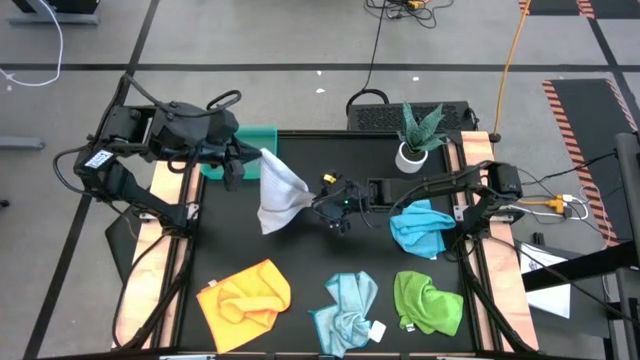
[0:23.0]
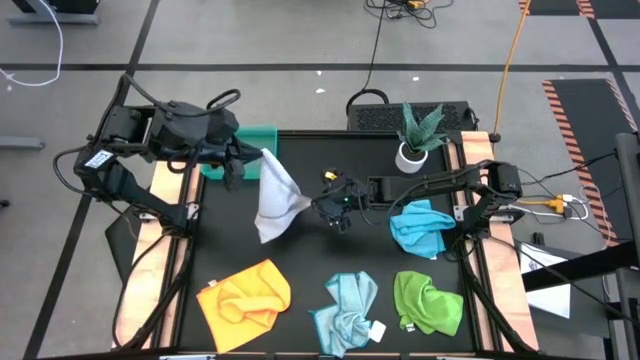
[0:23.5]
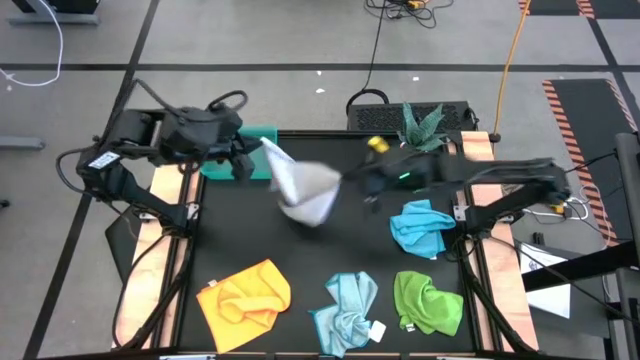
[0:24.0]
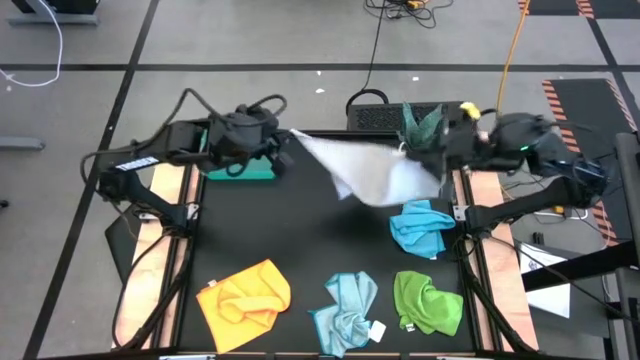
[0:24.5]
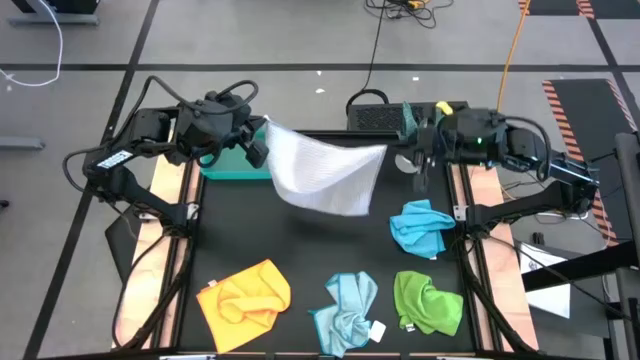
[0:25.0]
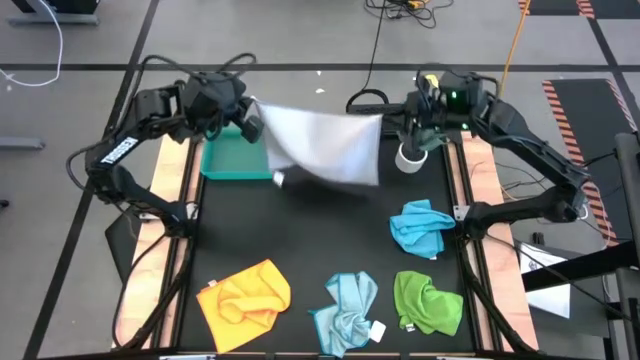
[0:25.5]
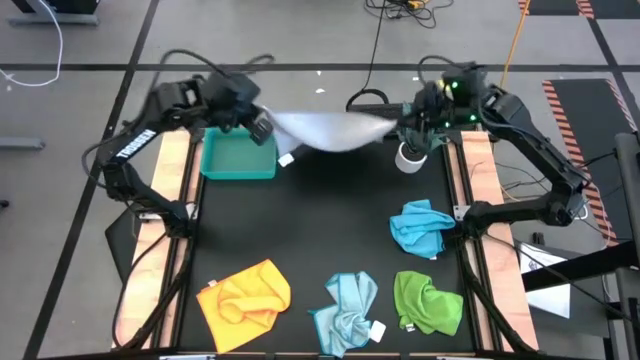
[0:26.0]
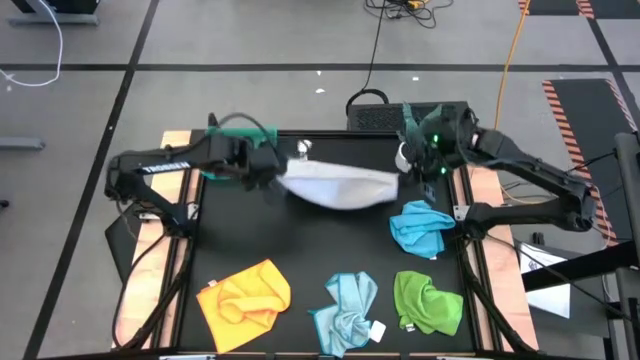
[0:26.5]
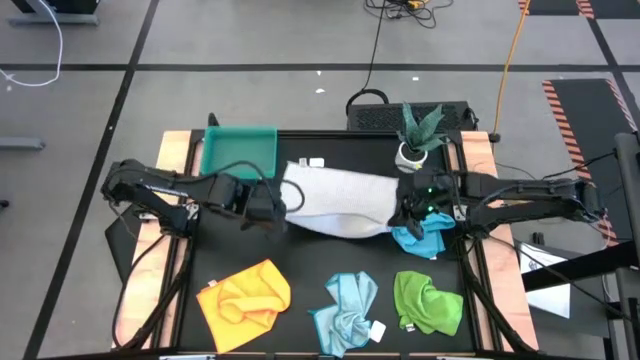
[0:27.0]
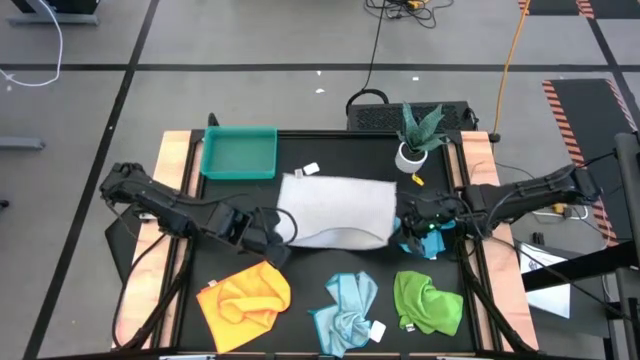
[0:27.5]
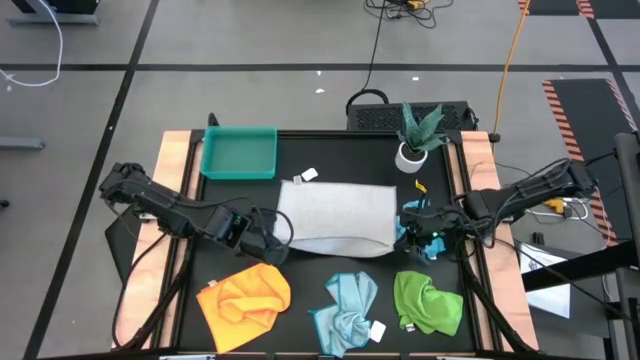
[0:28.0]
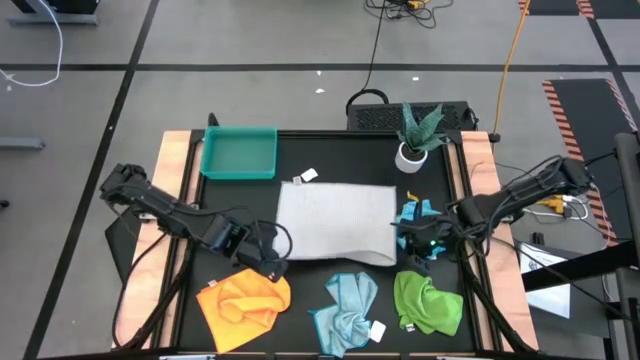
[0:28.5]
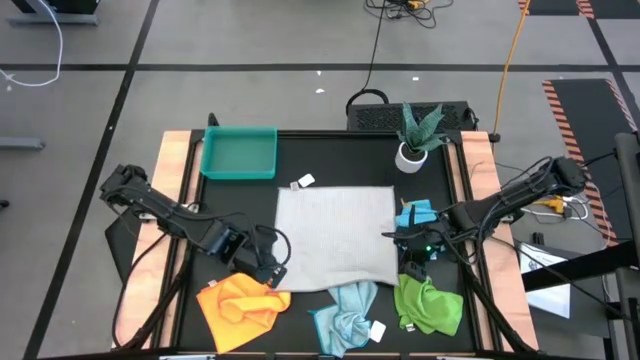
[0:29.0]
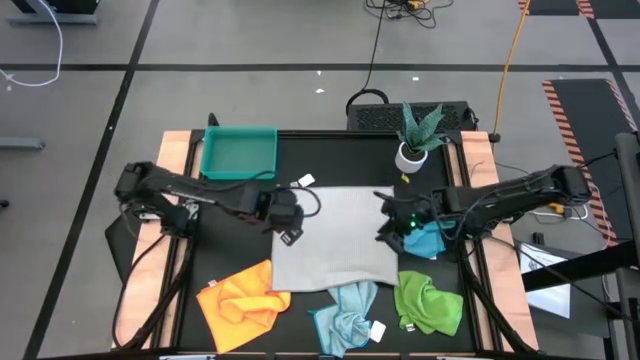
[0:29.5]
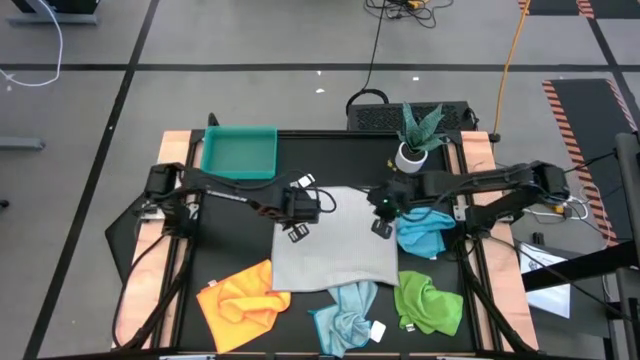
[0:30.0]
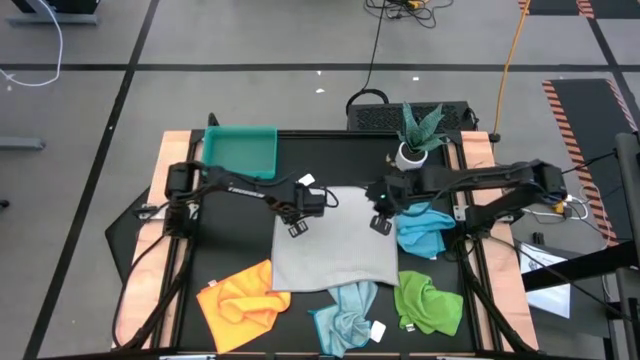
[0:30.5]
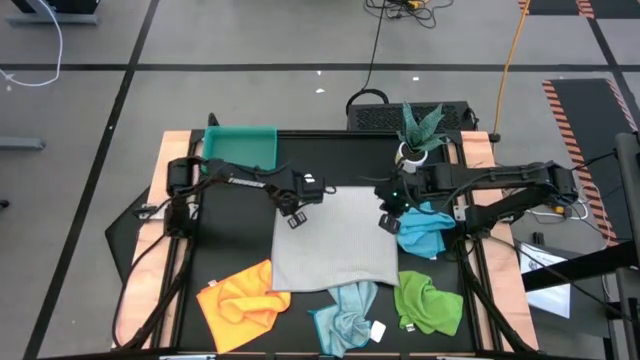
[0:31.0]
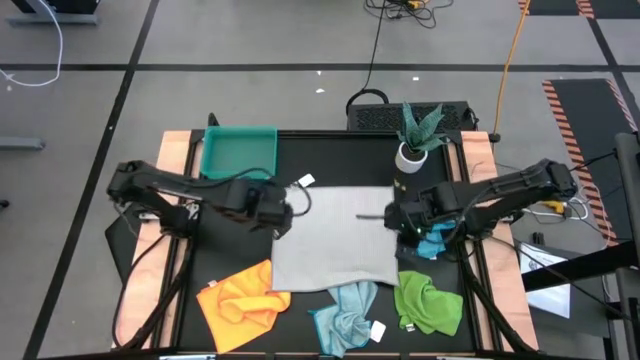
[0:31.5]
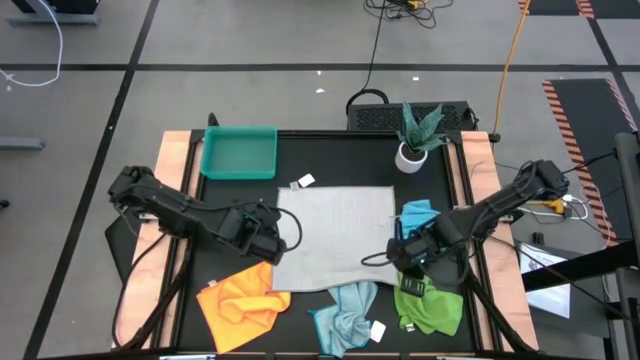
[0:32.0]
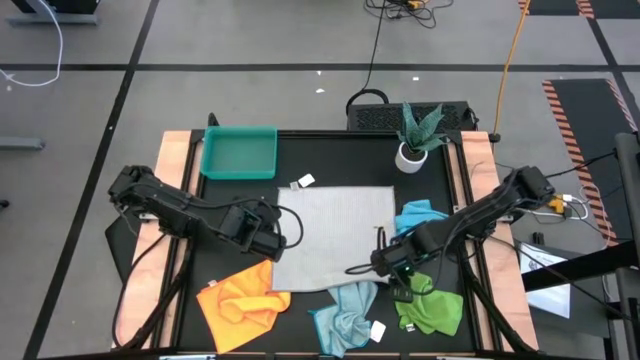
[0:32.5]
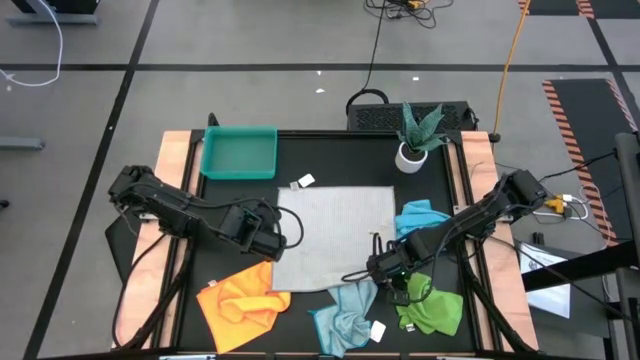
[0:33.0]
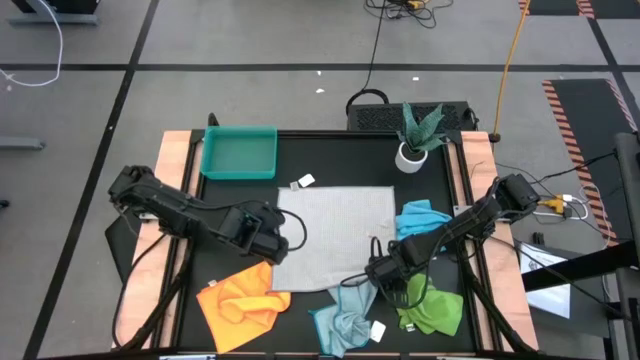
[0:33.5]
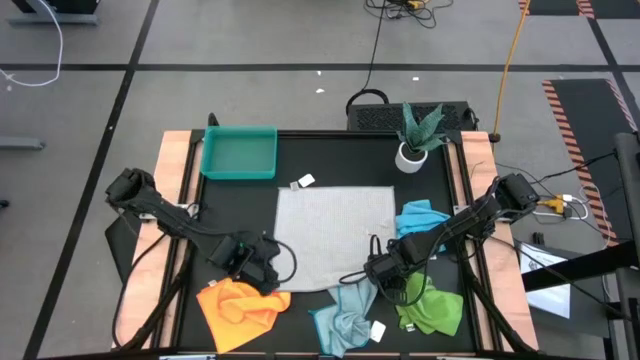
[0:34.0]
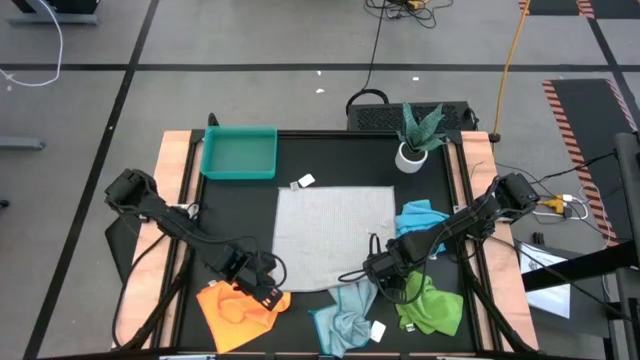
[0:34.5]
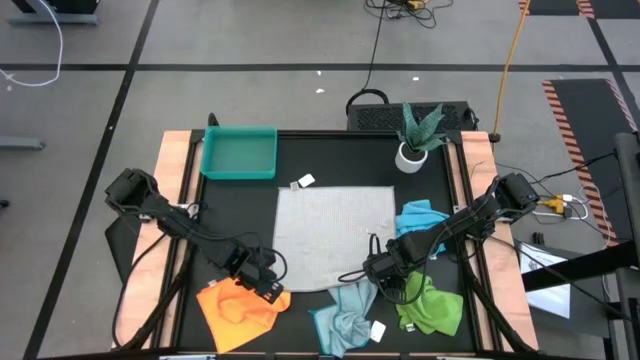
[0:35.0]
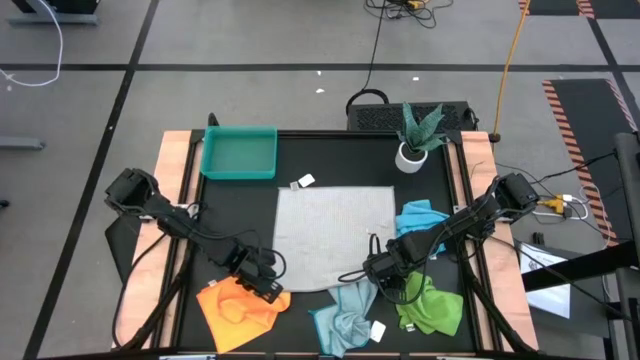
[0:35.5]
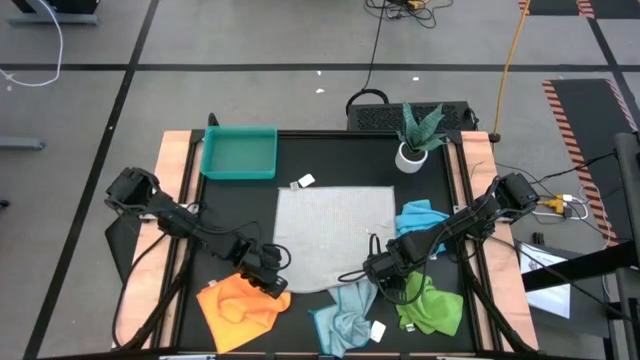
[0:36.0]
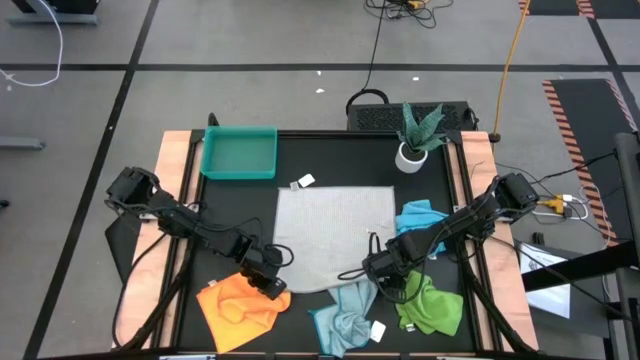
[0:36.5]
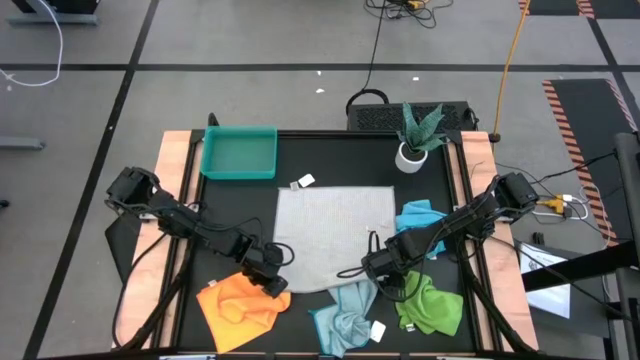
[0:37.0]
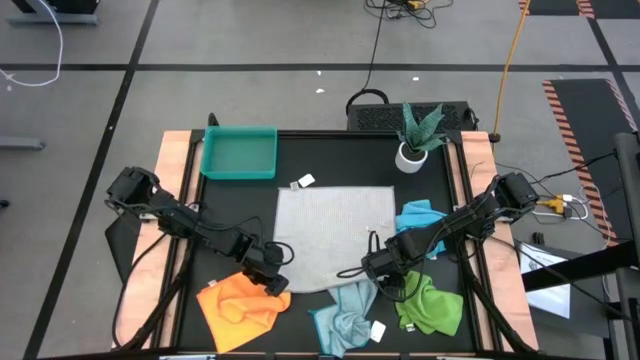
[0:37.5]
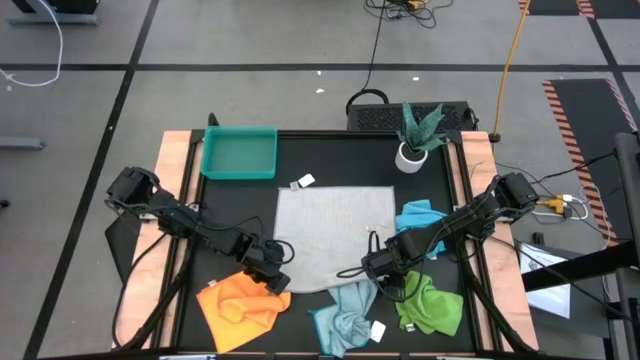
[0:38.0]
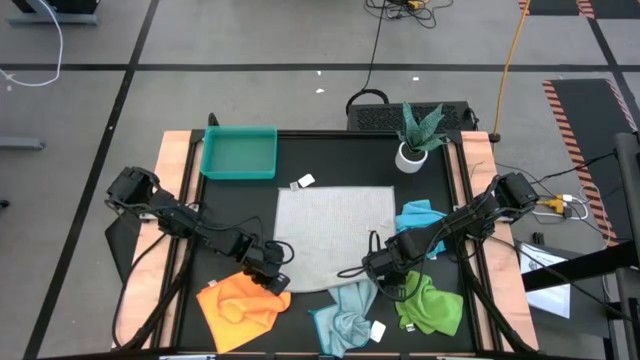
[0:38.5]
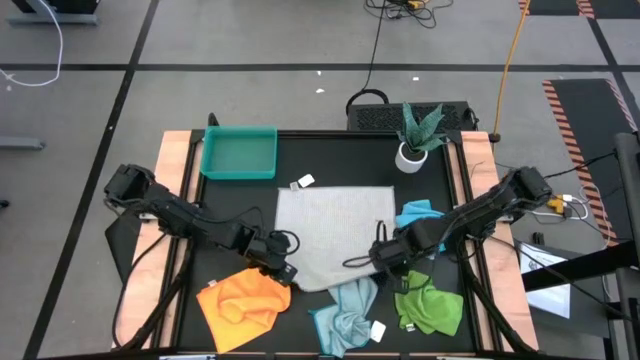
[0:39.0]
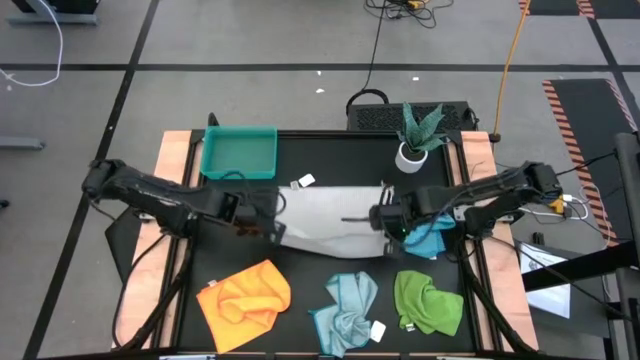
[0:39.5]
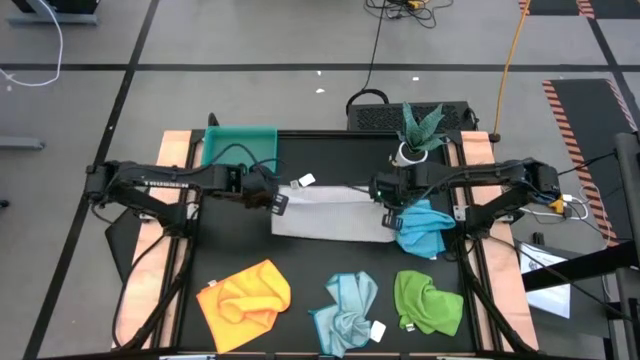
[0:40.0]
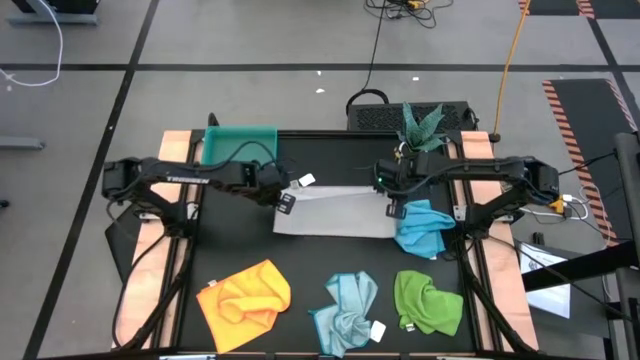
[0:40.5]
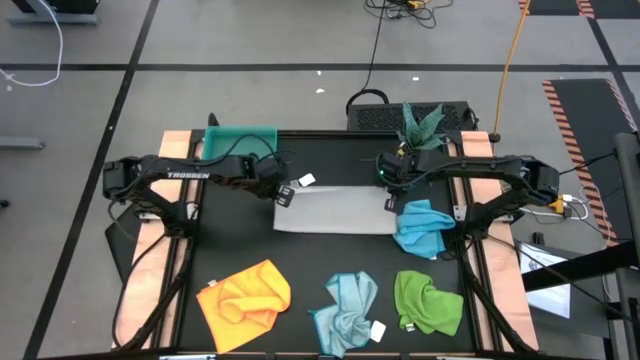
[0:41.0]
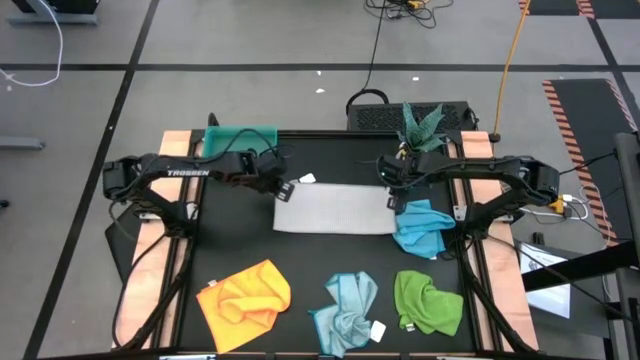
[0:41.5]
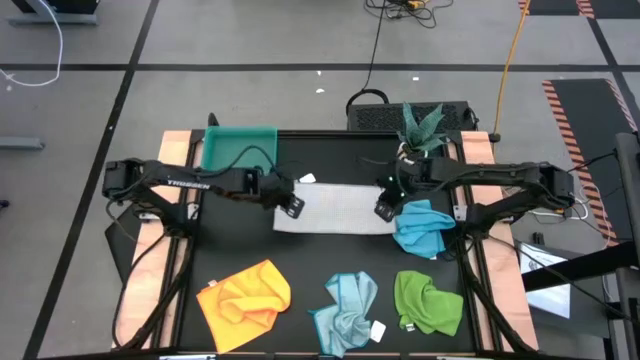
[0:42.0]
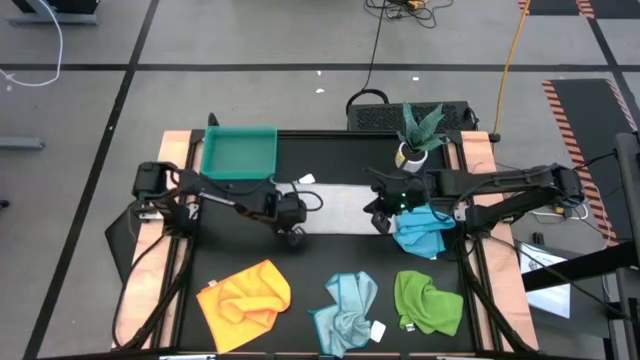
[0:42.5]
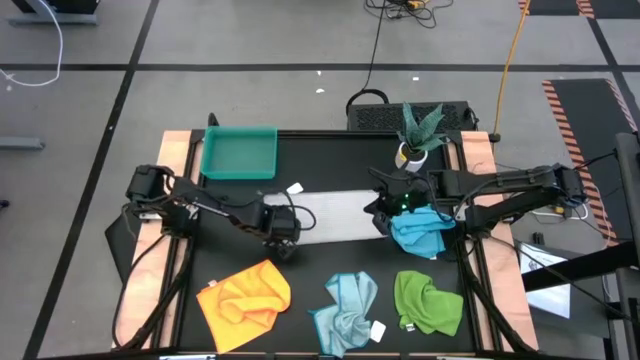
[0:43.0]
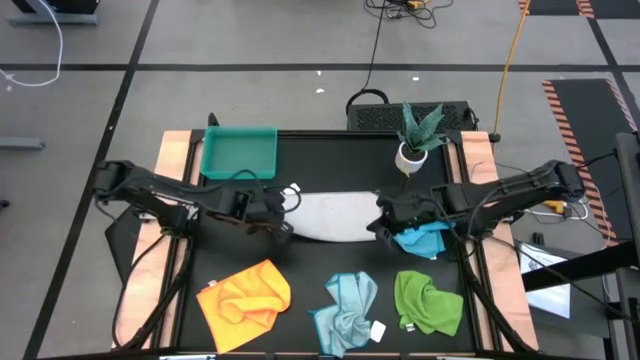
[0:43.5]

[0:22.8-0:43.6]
Task: Fold microfiber towels
Fold the gray microfiber towel
